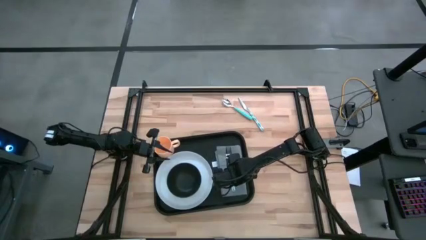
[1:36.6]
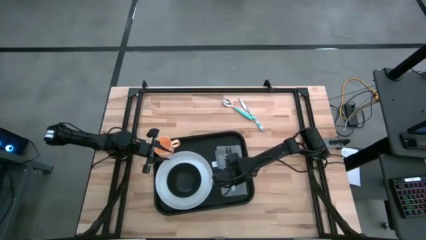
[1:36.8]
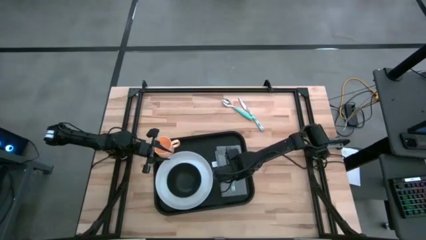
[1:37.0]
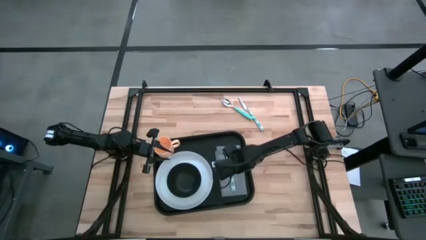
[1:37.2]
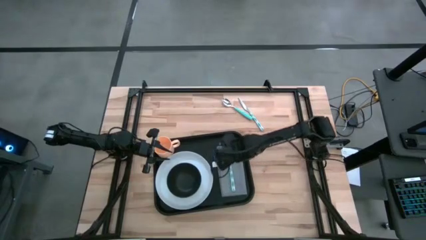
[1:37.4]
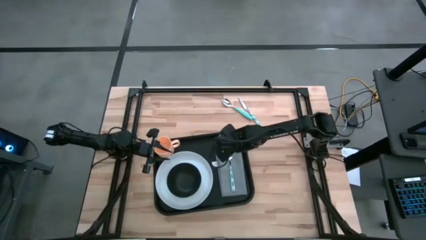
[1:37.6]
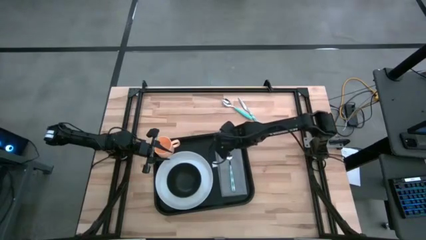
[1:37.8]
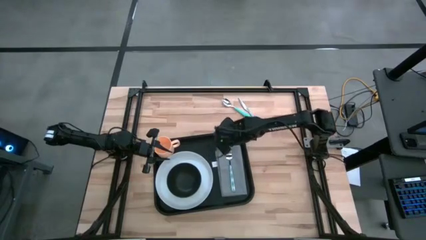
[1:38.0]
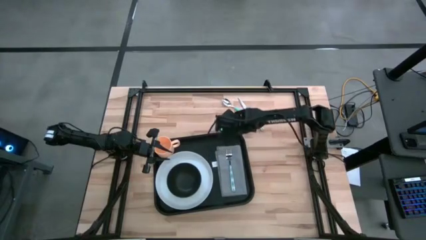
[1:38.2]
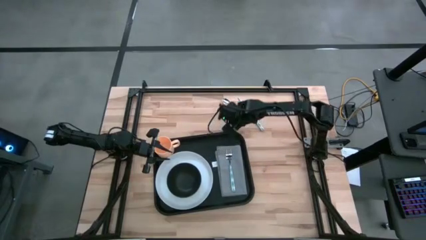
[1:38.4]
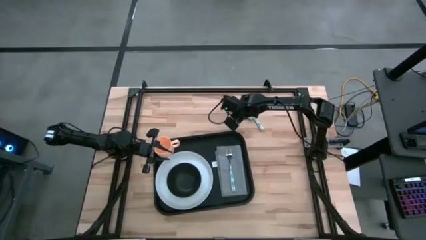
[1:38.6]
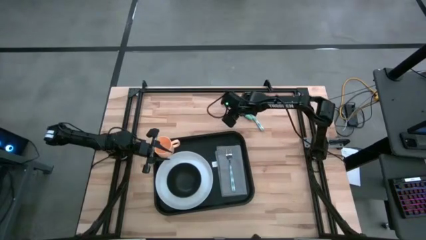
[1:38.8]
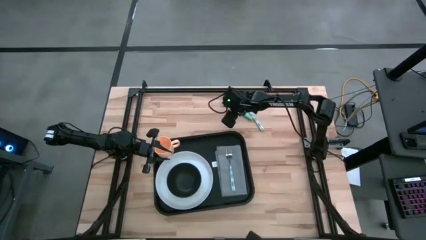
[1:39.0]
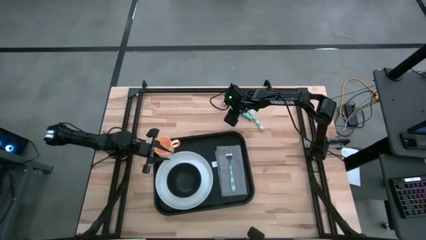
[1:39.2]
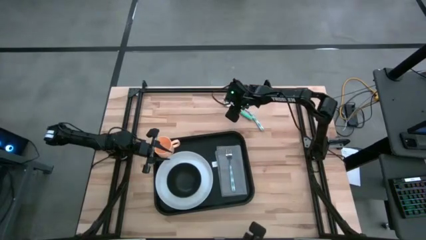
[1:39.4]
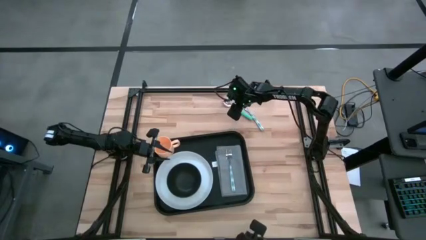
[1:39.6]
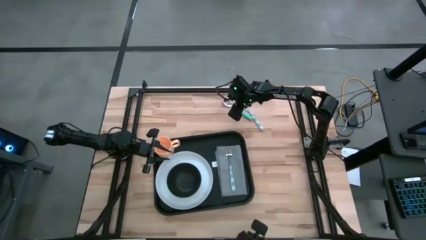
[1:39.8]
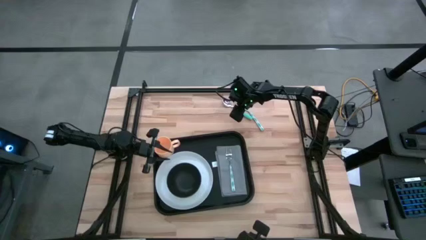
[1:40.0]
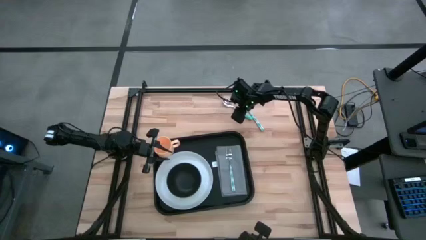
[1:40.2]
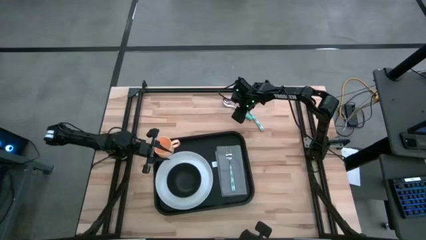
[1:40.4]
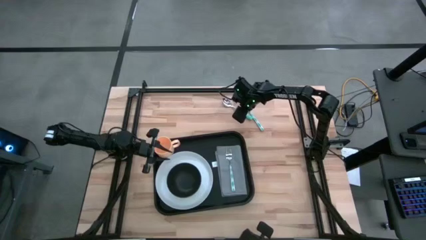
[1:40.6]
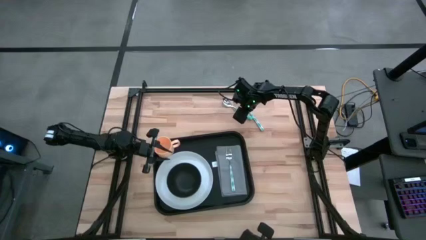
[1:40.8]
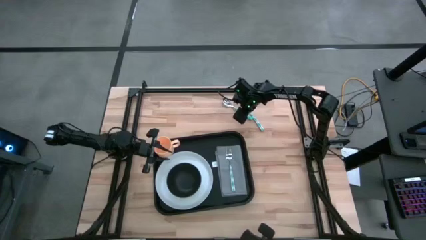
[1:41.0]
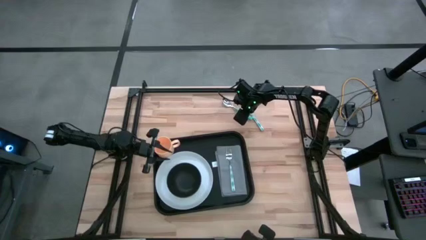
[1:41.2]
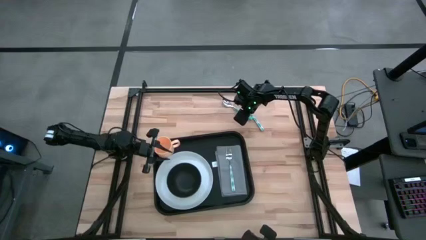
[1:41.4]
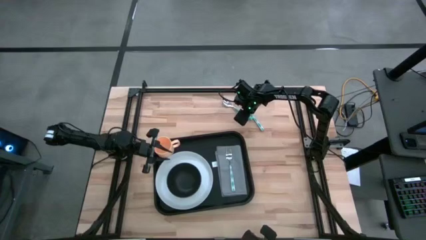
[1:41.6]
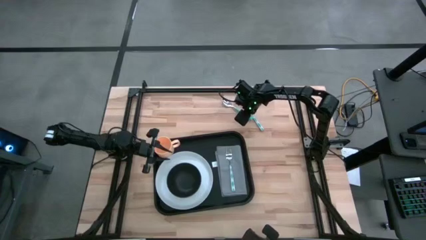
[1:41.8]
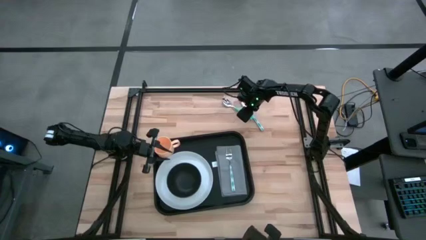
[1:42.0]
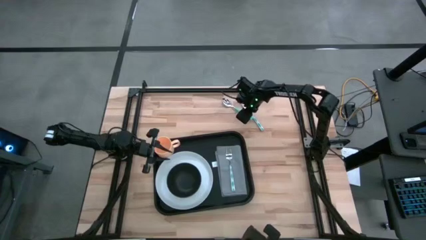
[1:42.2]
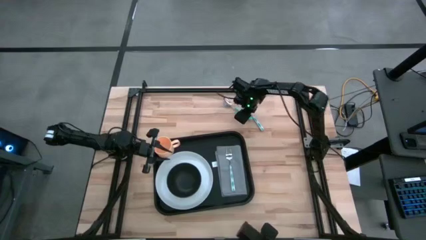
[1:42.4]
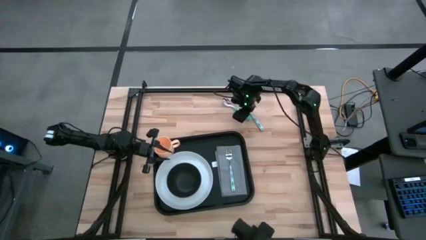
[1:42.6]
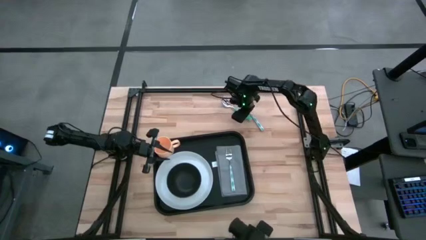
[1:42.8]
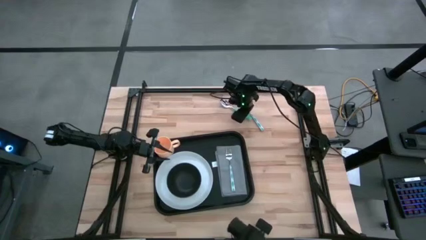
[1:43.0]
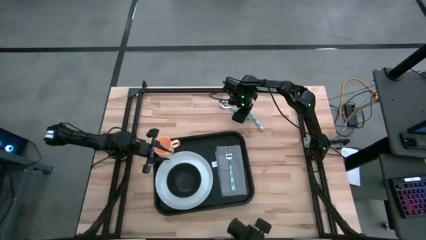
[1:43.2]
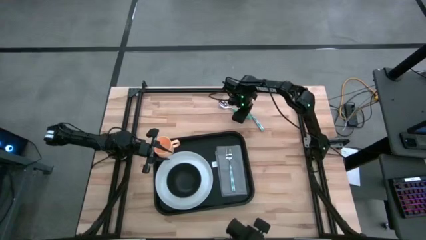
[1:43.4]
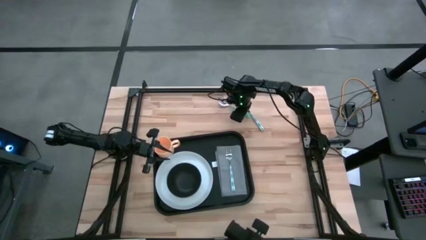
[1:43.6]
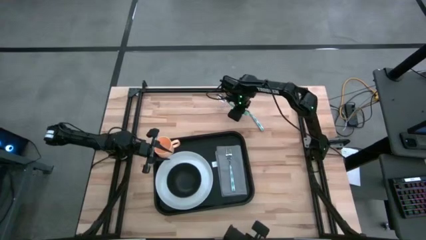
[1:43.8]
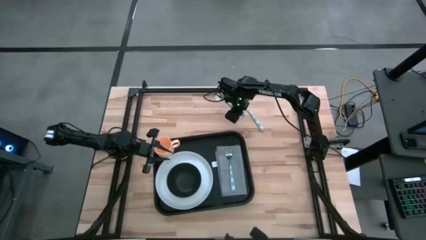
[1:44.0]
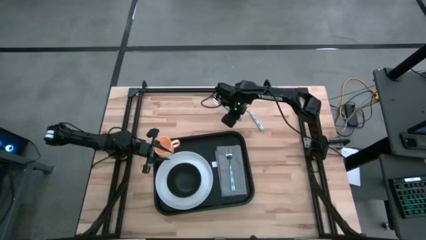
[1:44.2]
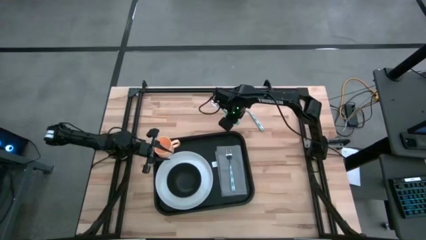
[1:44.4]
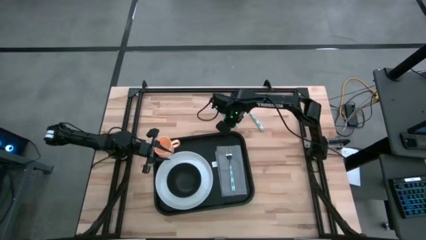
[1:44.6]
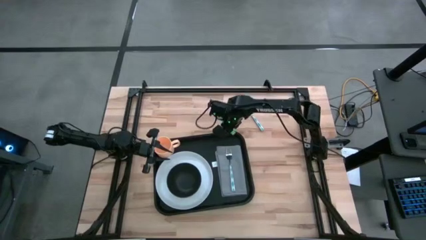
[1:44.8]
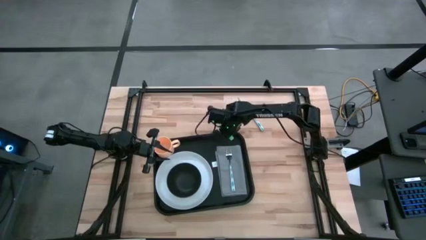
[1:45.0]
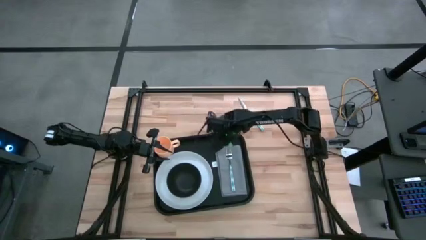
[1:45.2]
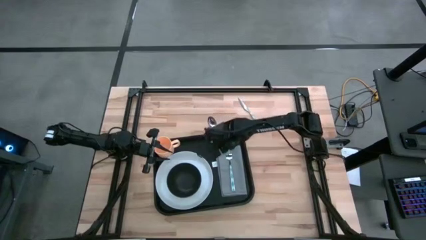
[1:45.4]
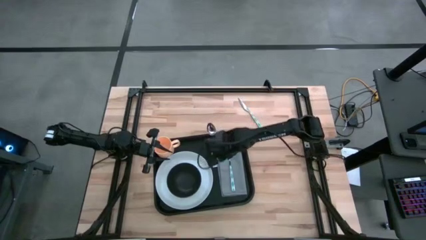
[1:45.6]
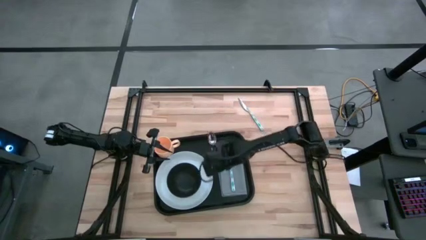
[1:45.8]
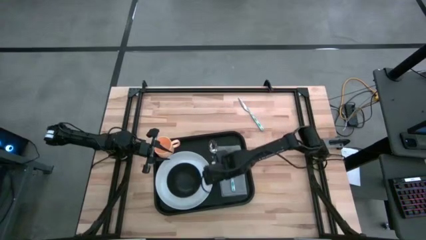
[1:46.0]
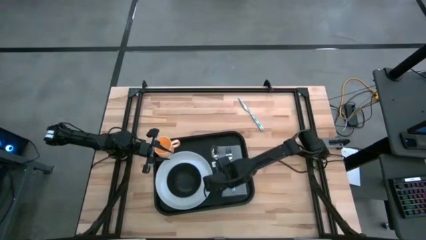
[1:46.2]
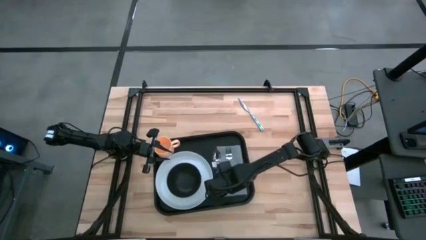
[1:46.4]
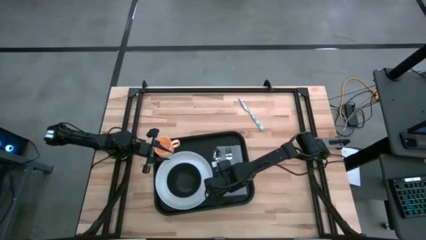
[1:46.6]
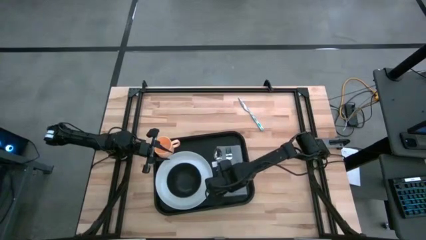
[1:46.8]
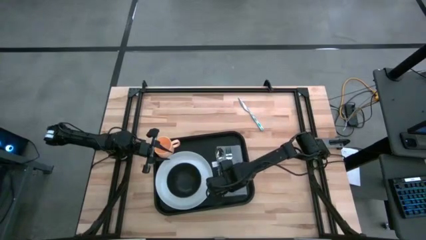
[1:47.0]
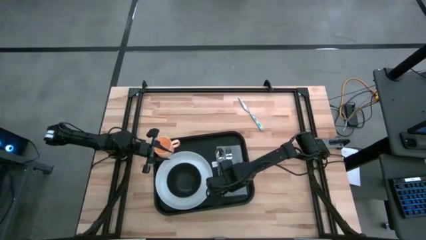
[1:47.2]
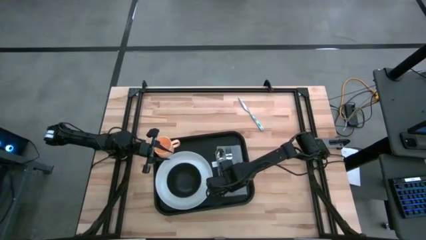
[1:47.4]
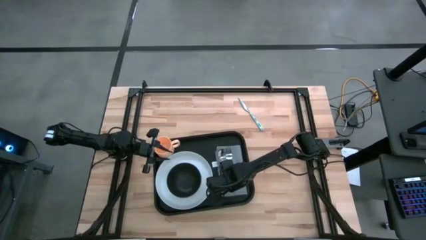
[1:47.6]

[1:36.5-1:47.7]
Task: Set up tray
Put the green spoon on the gray napkin to the left of the green patterned fork

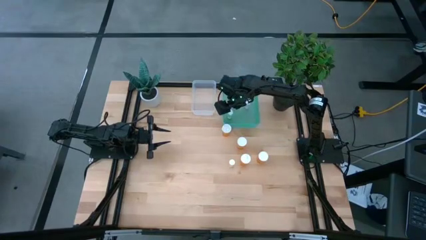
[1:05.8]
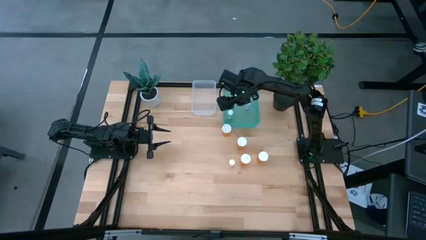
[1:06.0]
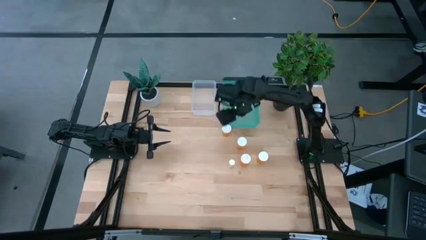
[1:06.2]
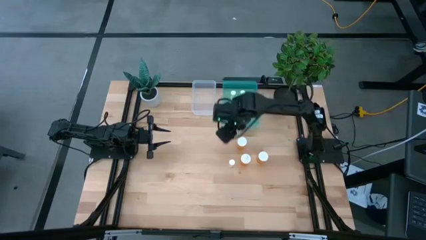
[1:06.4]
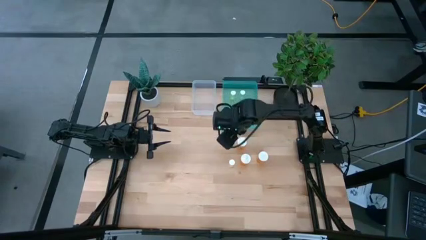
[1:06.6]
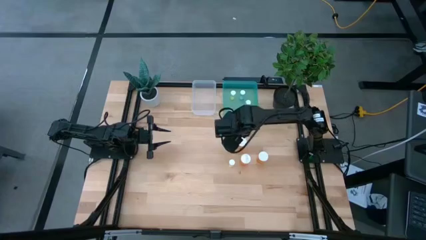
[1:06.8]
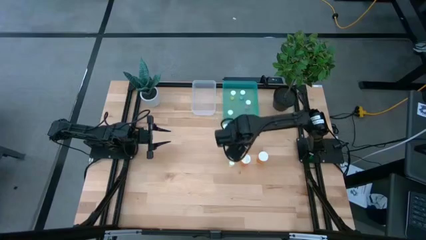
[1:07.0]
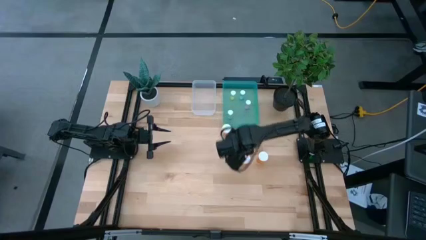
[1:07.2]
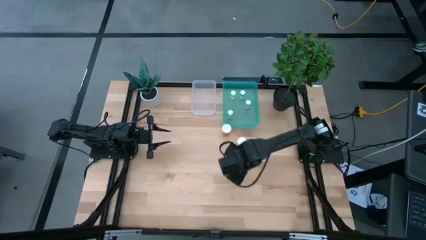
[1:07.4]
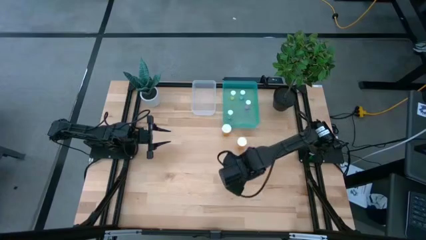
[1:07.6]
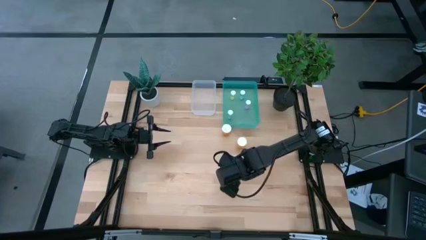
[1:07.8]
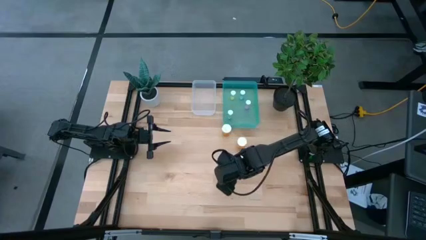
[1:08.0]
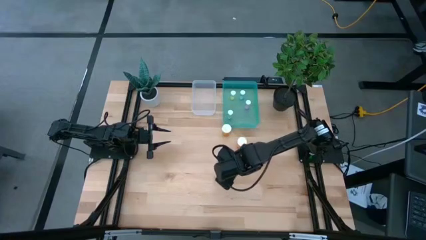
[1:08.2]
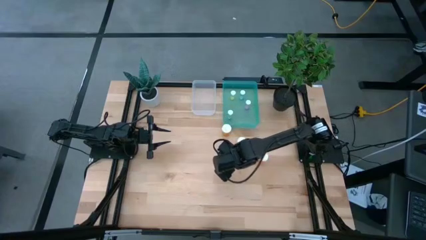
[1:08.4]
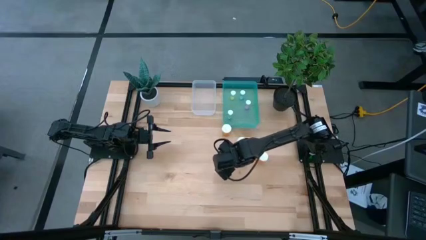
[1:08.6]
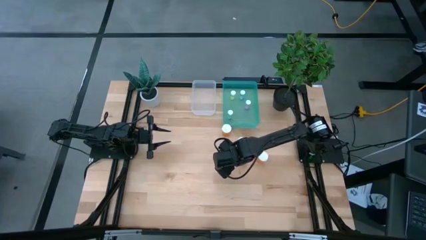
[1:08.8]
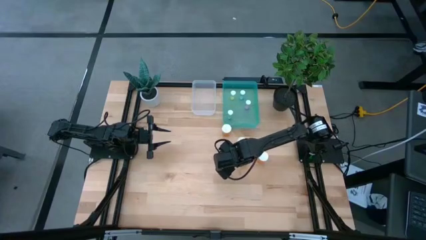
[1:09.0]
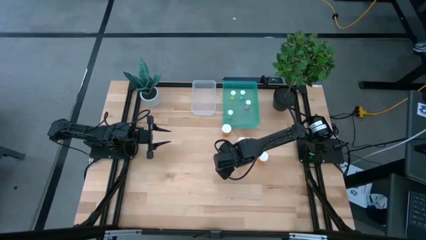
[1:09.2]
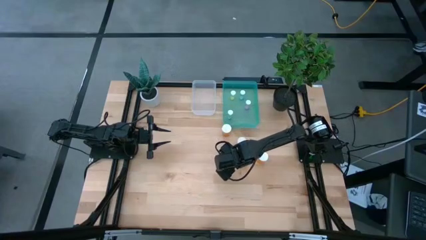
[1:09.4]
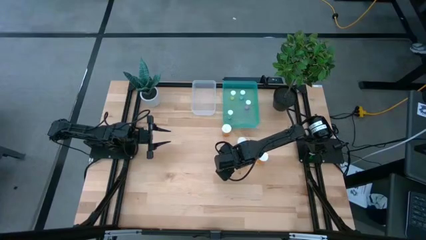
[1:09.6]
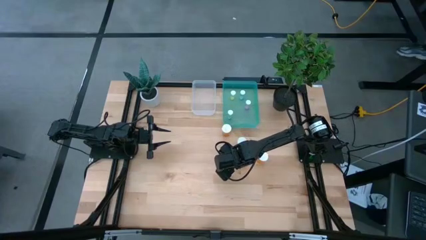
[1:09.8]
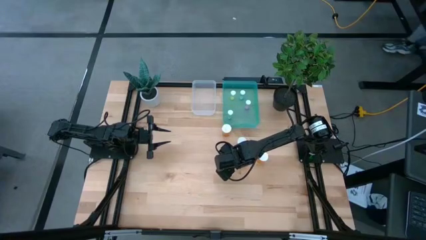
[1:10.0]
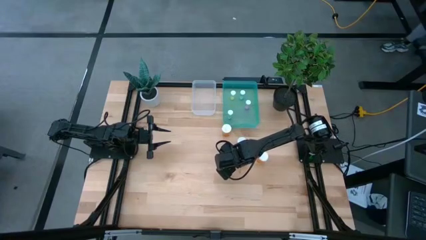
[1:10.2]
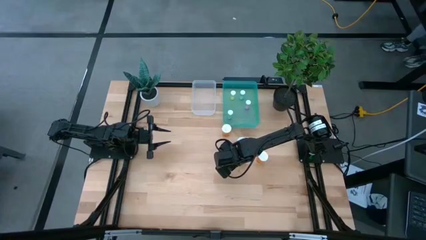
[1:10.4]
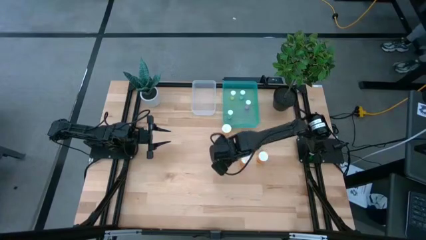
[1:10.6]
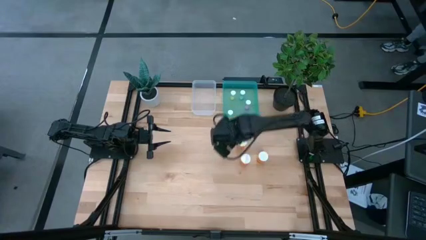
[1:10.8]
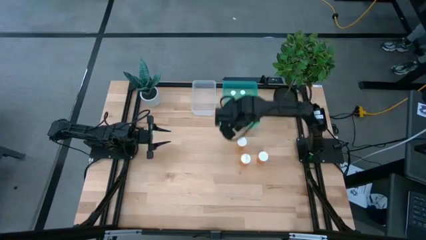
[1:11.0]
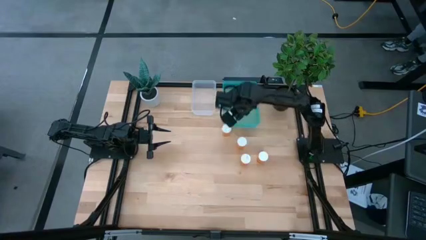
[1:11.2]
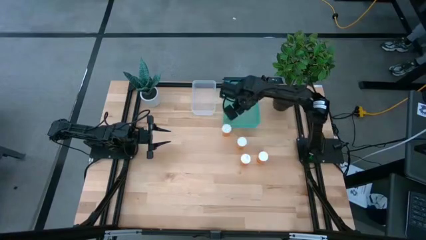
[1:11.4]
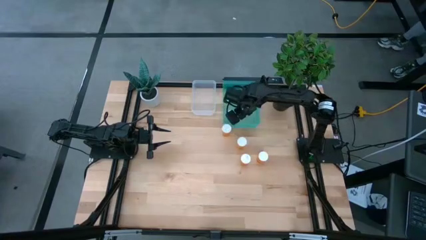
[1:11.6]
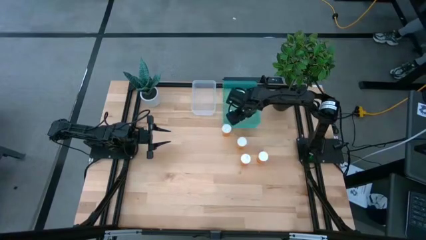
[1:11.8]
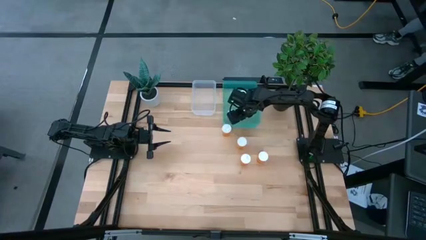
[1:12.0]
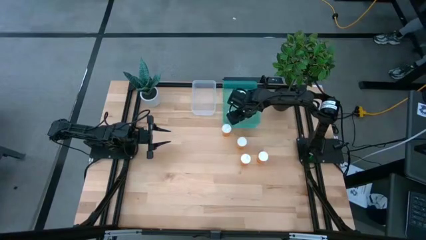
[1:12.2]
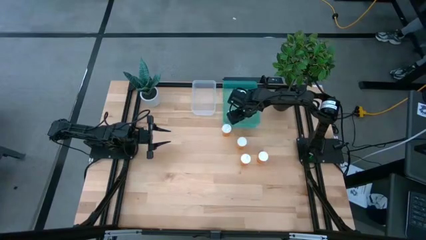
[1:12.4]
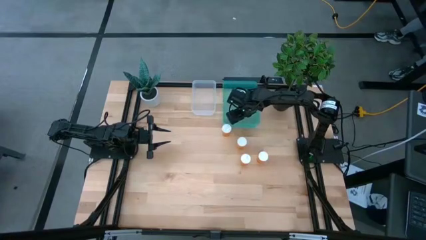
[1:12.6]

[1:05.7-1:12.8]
Task: Pick and place medicine bottles into bin by pill shape (circle, oval)
Put the yellow tablet bottle into the blue bin
